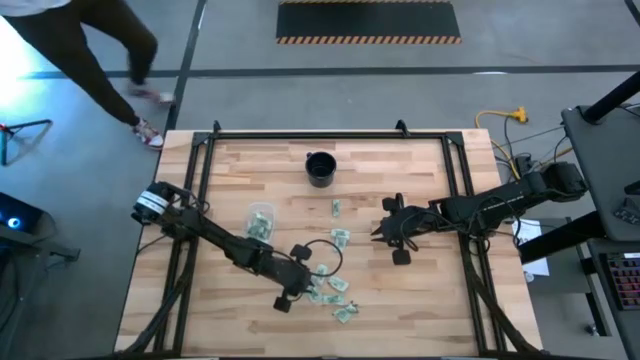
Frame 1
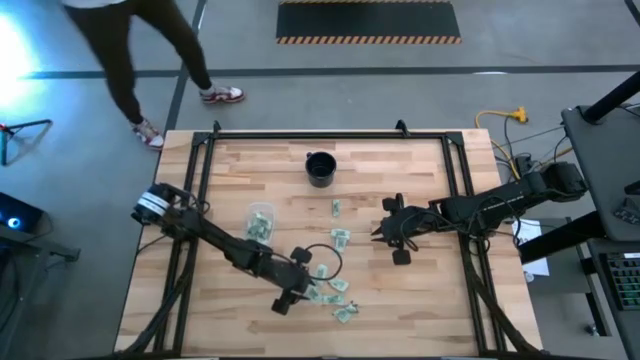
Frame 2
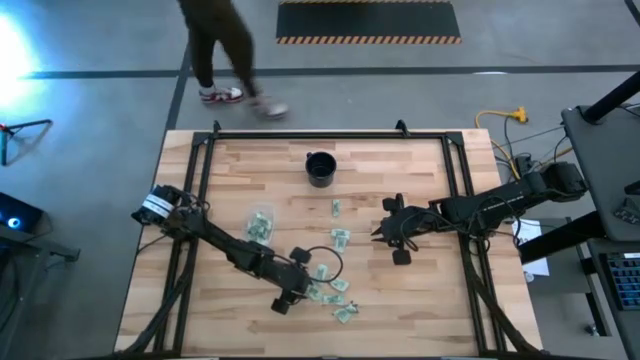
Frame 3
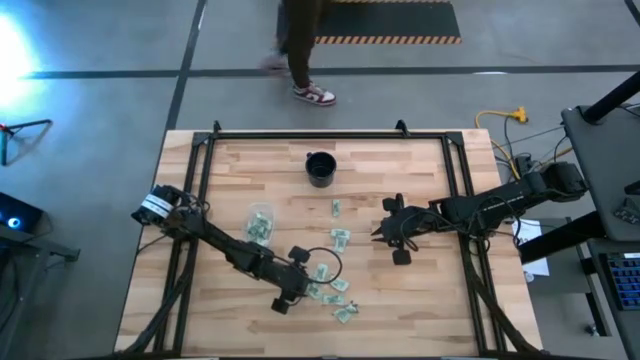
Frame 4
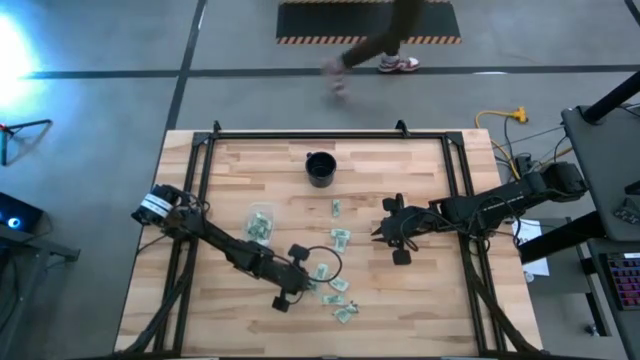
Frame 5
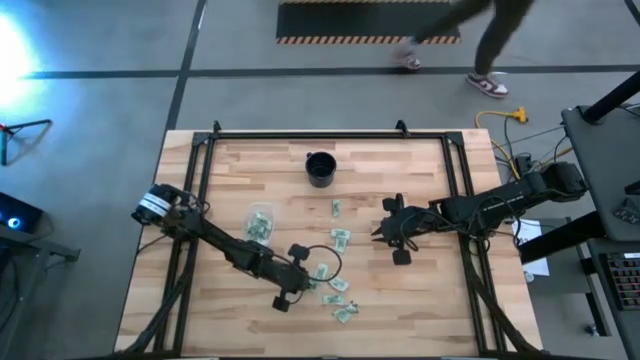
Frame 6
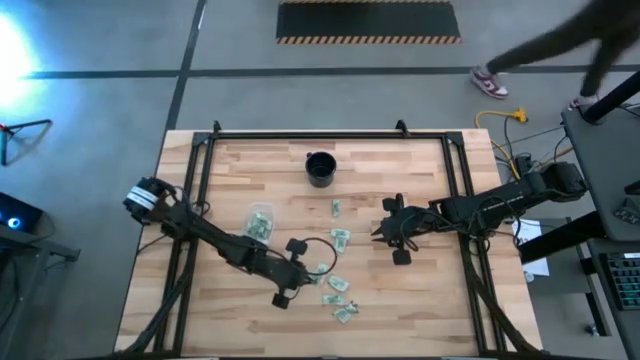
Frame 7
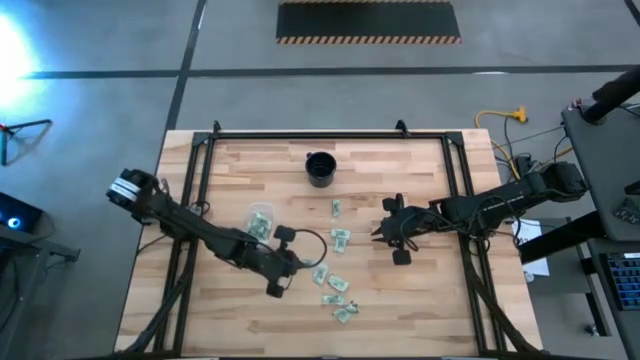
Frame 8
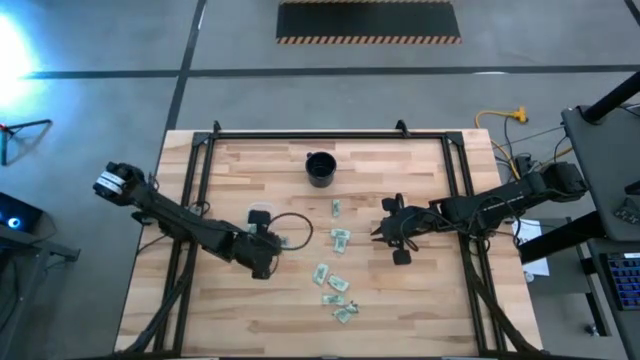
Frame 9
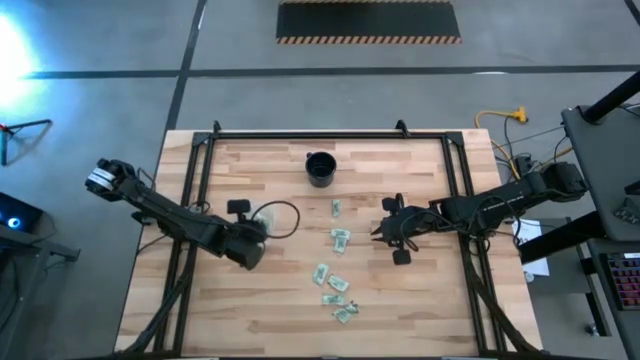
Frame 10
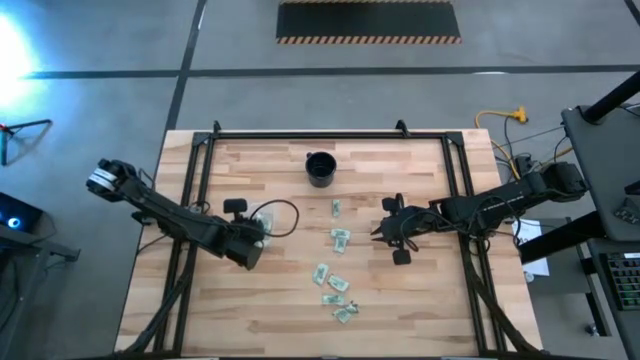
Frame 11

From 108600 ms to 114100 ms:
Task: Pick and place Stevia / Truvia into bins
Put the light green stevia packet into the rectangular container

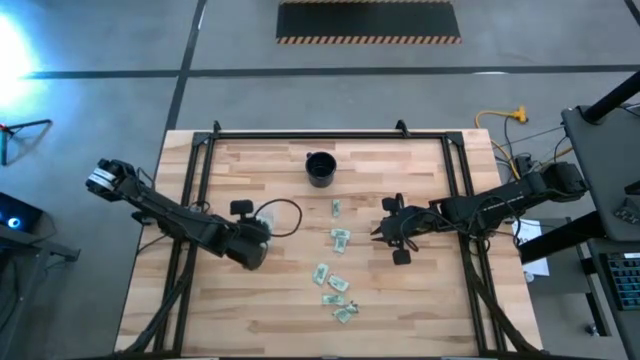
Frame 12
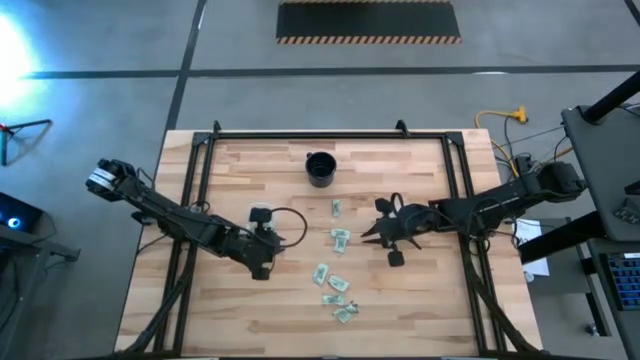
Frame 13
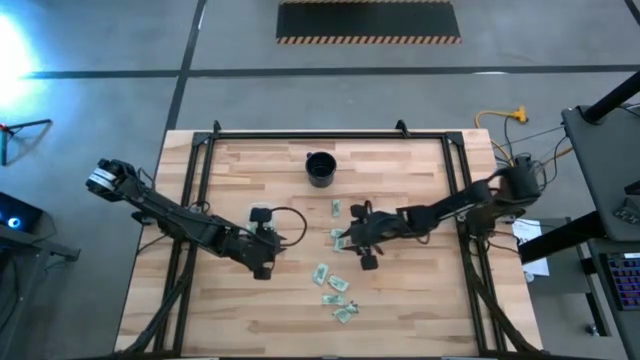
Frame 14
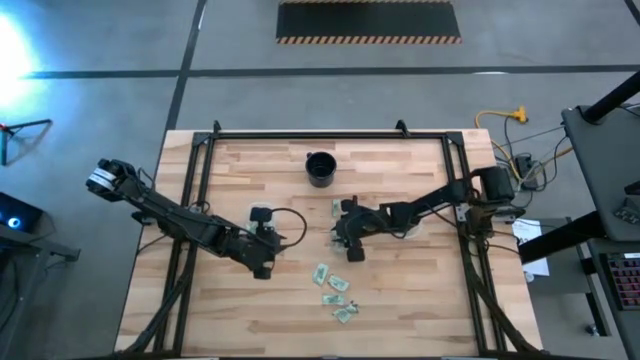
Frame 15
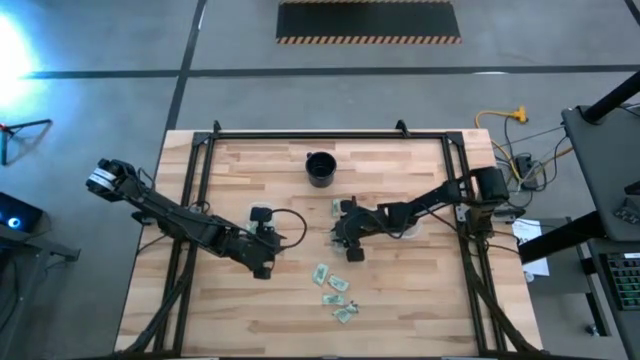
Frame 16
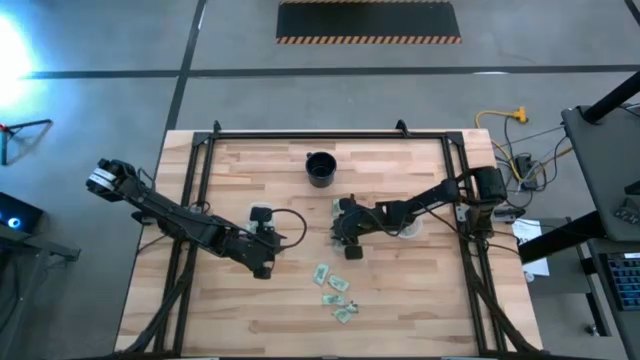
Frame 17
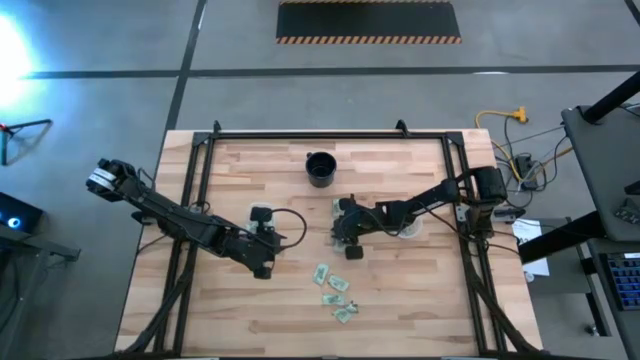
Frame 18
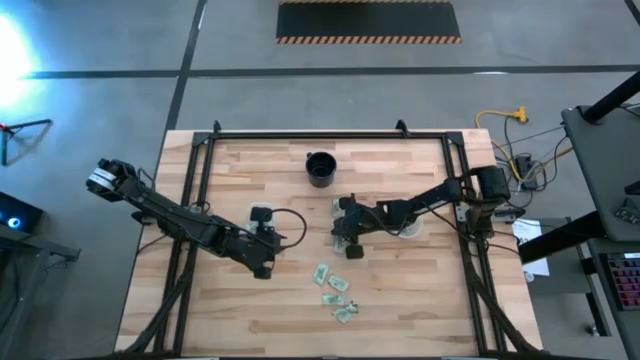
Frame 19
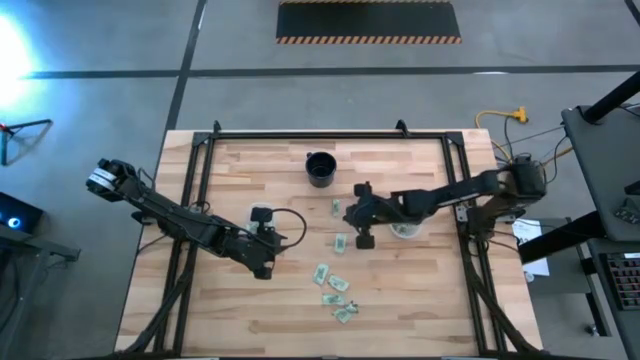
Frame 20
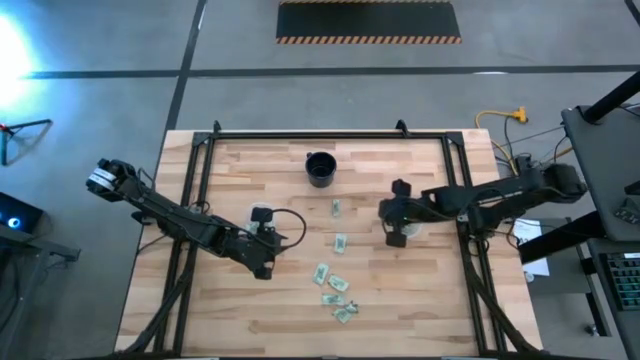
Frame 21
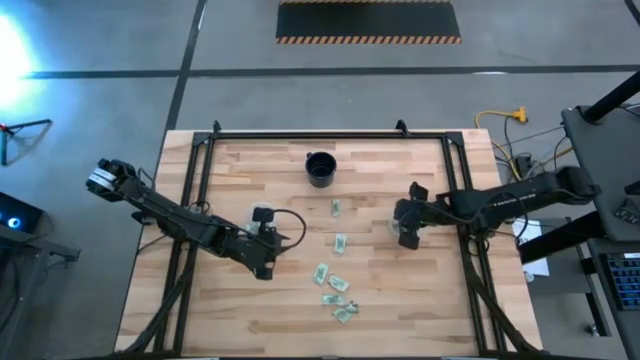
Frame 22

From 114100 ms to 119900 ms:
Put the light green stevia packet into the circular container

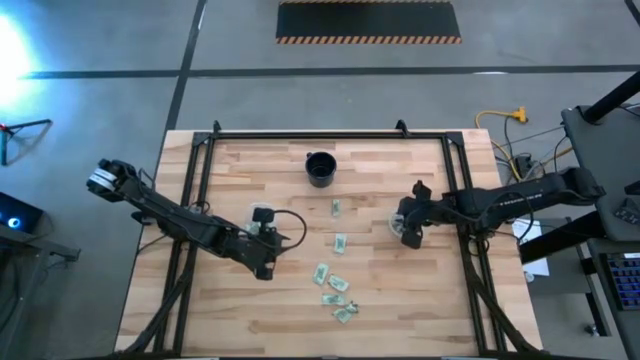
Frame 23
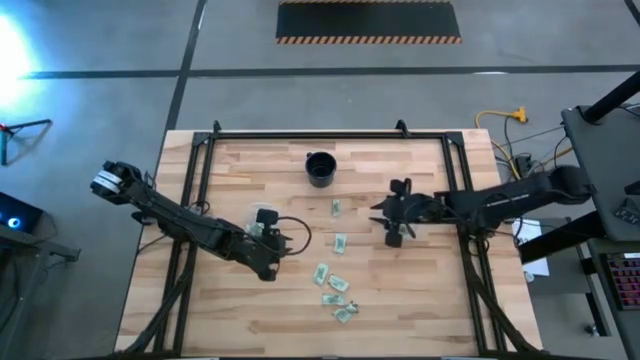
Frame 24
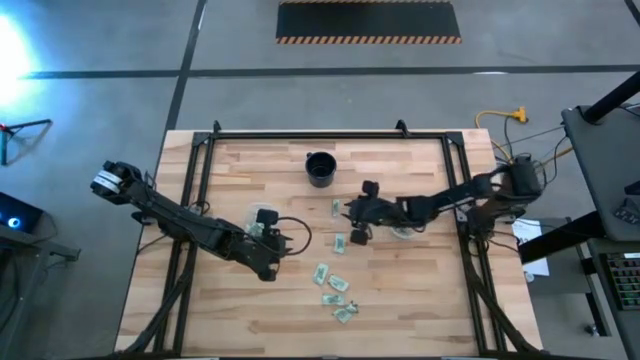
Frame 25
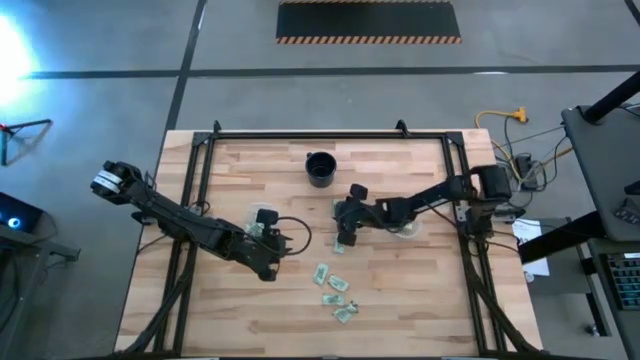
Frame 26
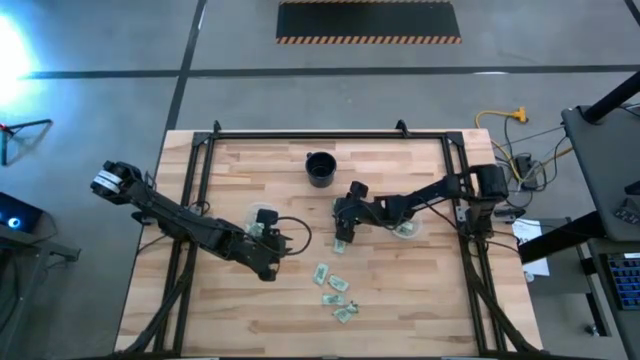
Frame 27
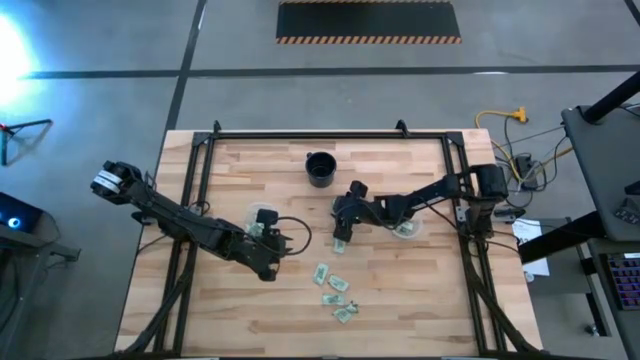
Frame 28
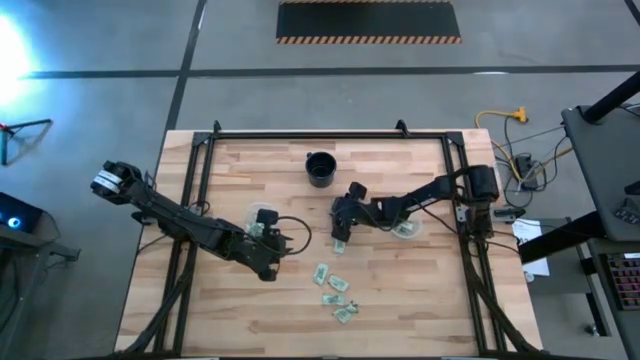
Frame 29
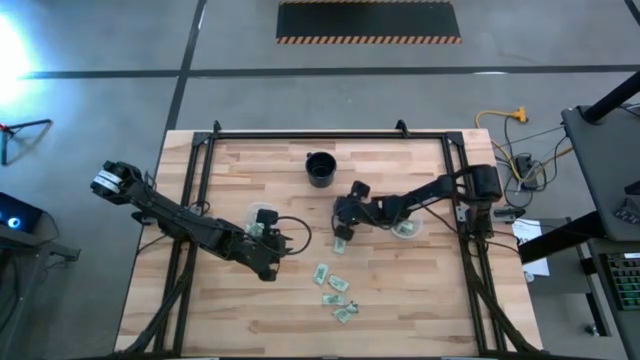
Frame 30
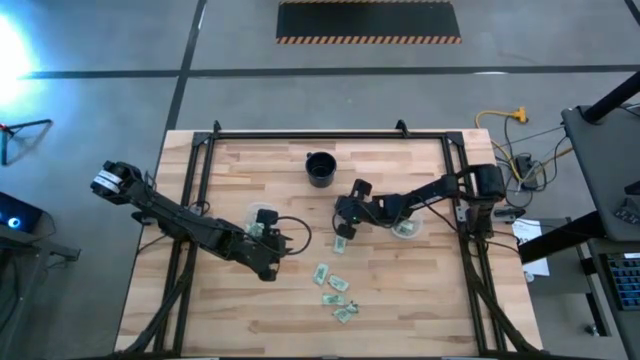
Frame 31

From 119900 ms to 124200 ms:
Put the light green stevia packet into the circular container

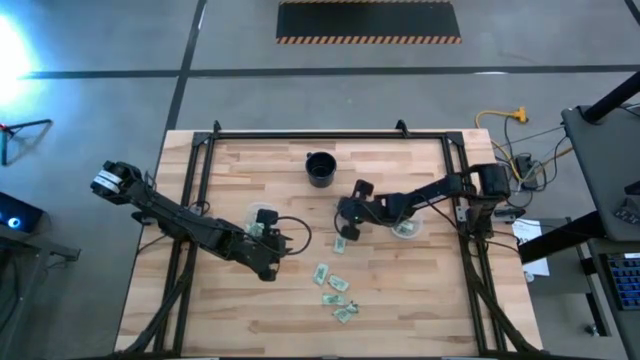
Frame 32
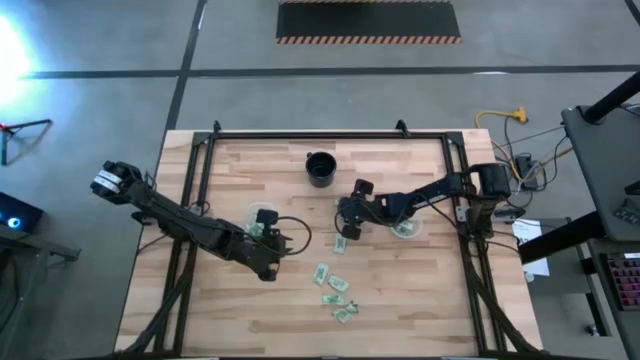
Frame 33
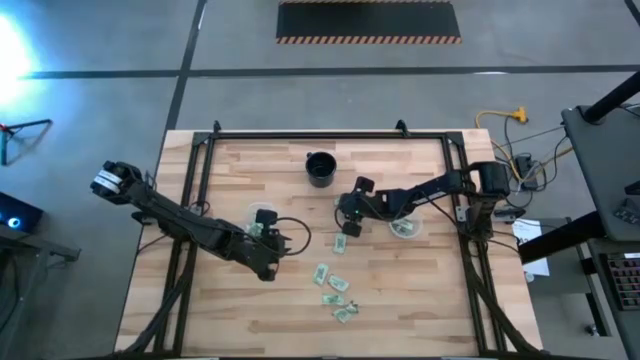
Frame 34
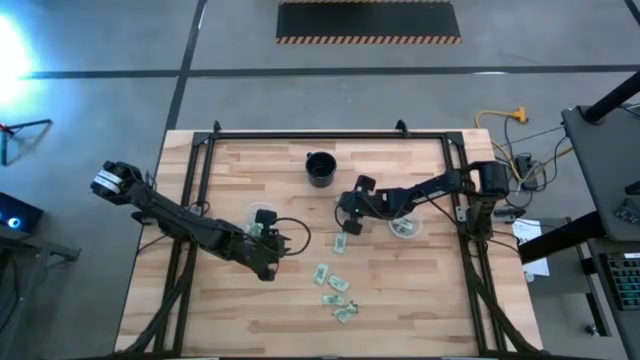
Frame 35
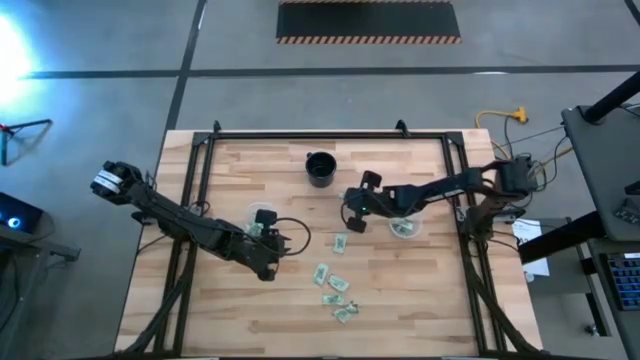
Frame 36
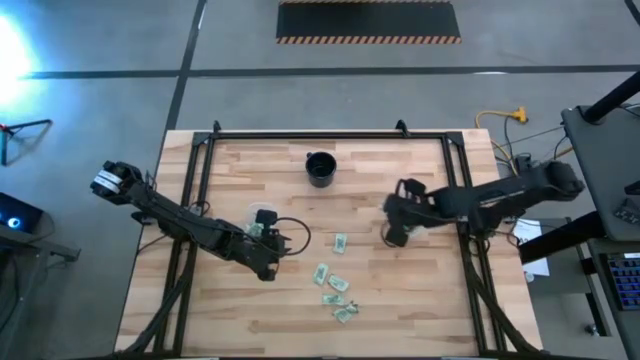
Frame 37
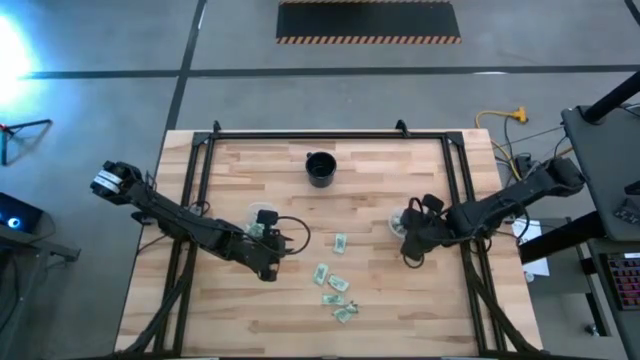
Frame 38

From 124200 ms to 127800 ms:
Put the light green stevia packet into the circular container

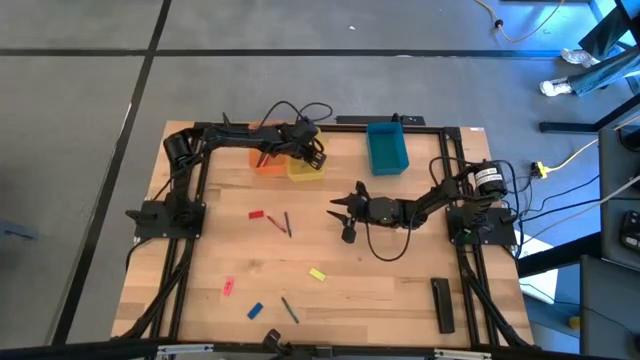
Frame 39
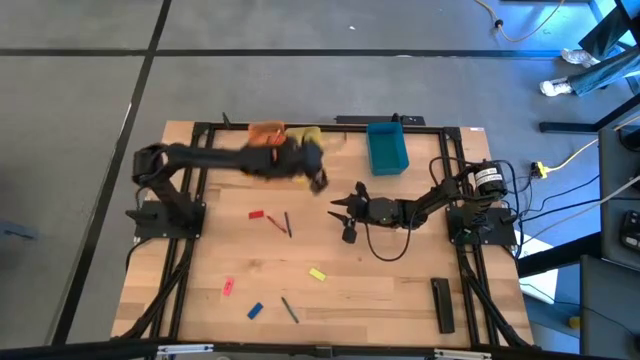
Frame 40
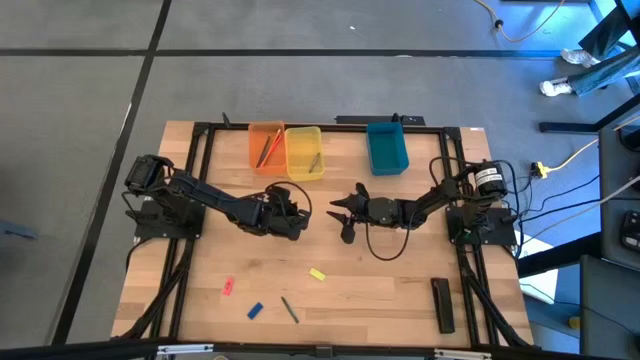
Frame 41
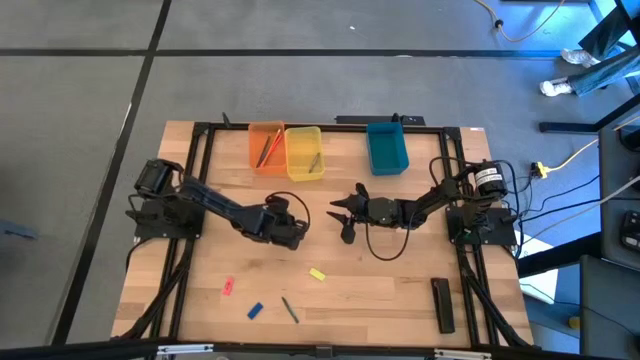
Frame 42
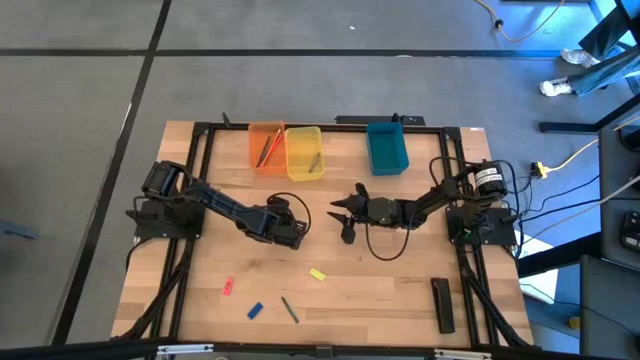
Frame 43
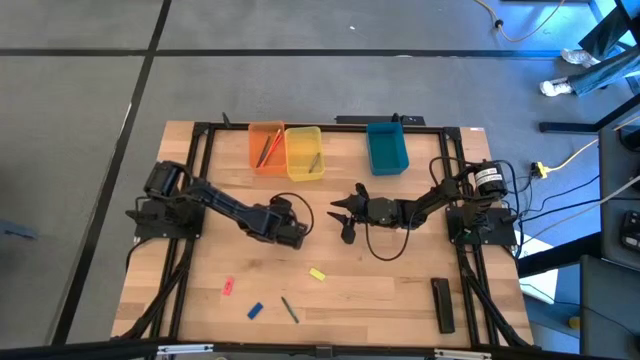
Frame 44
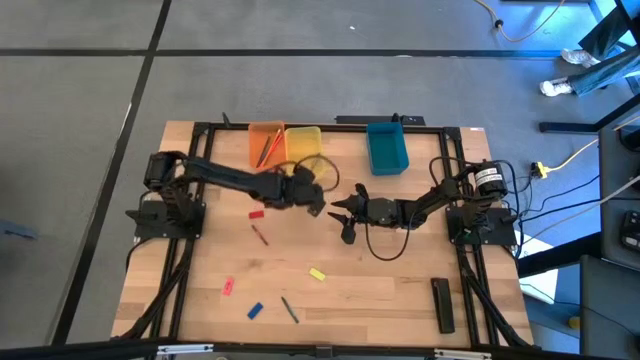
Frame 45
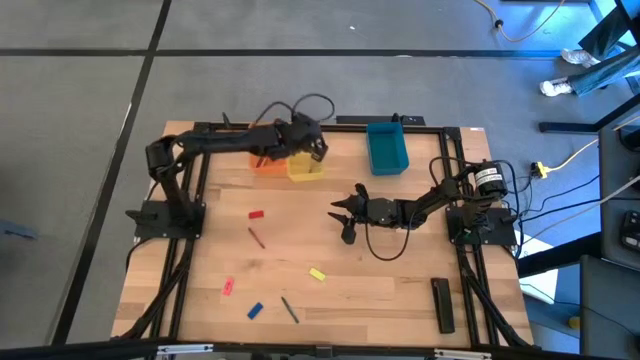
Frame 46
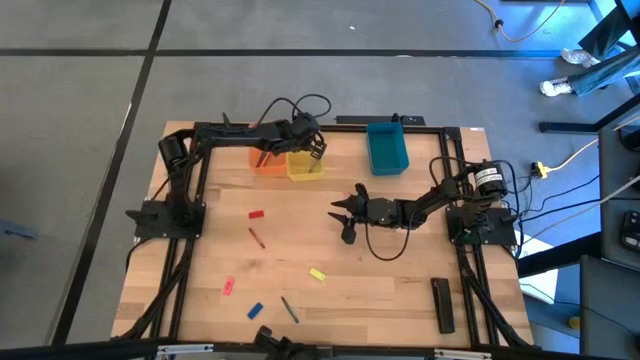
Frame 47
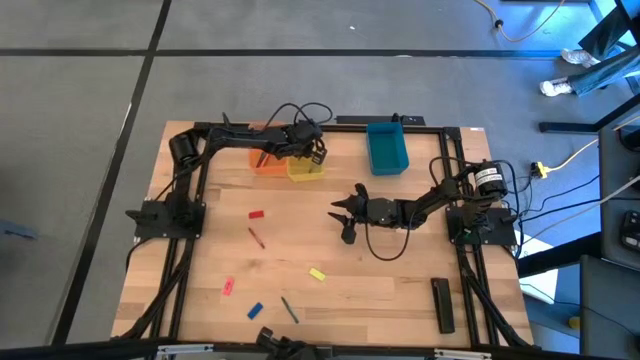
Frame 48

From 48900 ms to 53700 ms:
Task: Sort crayons/erasers/pens/pencils in bins
Put the blue crayon into the yellow bin
